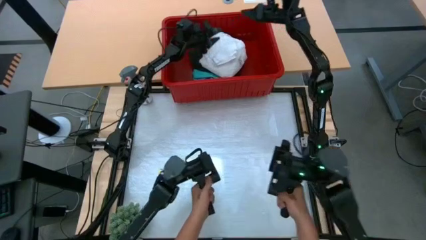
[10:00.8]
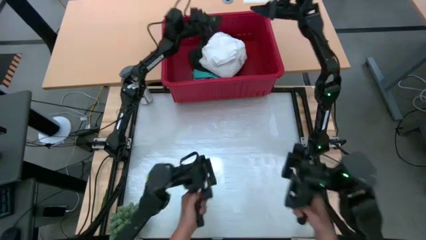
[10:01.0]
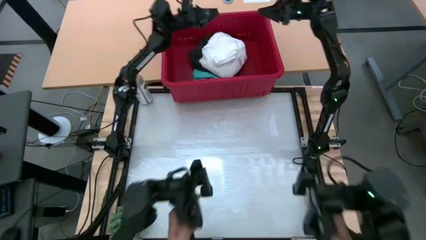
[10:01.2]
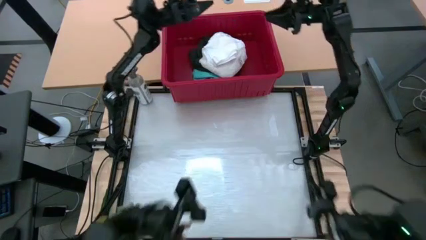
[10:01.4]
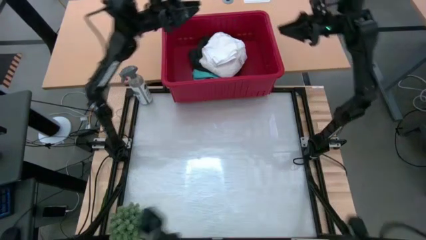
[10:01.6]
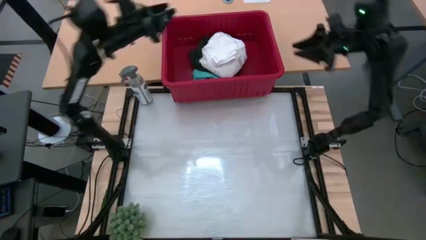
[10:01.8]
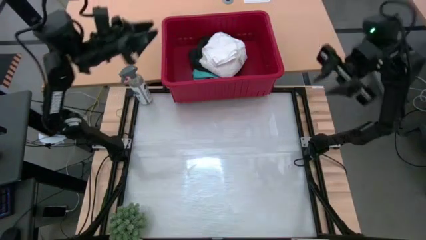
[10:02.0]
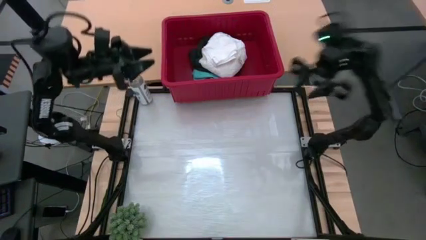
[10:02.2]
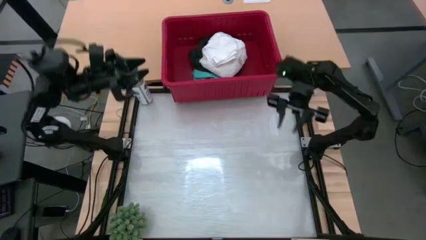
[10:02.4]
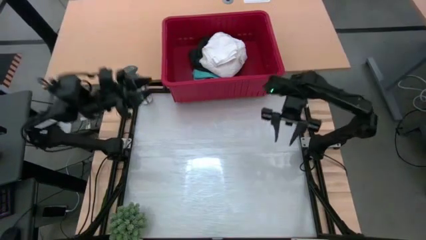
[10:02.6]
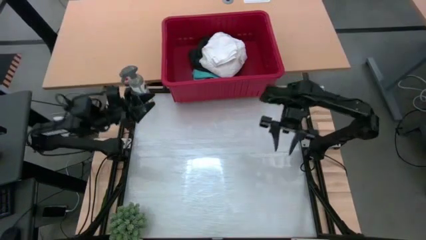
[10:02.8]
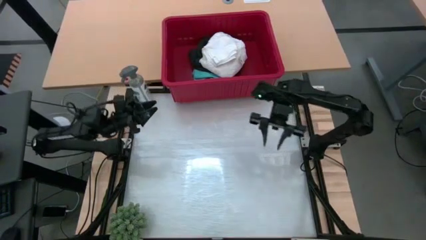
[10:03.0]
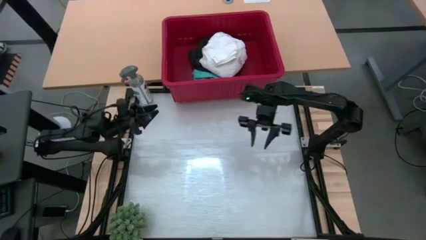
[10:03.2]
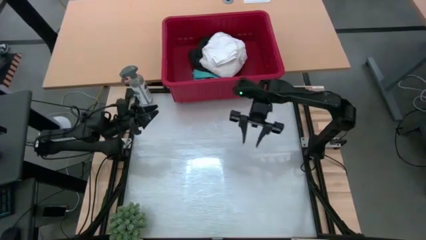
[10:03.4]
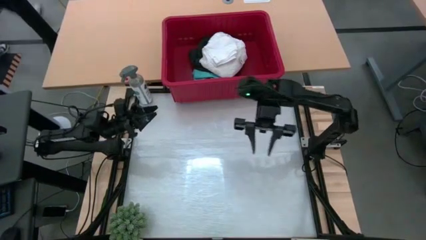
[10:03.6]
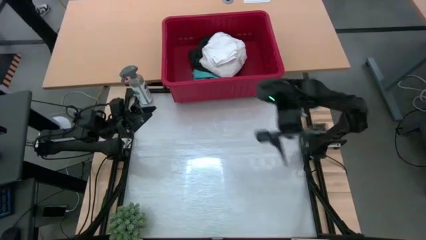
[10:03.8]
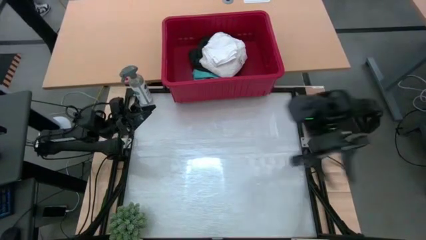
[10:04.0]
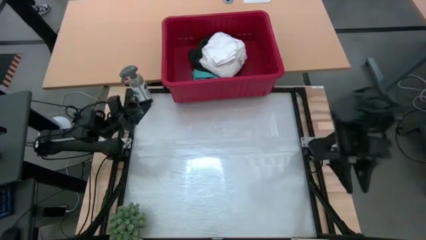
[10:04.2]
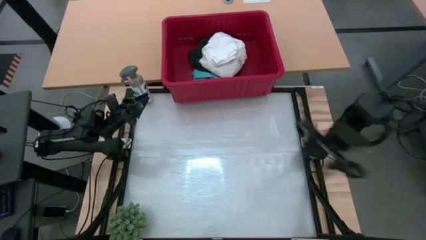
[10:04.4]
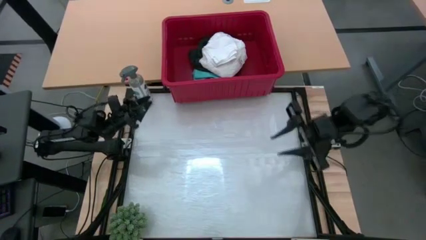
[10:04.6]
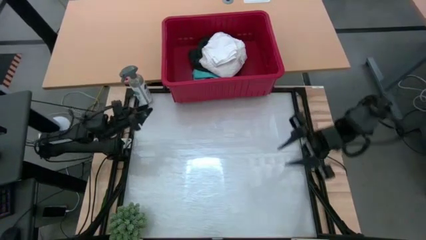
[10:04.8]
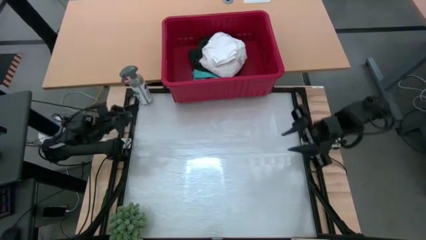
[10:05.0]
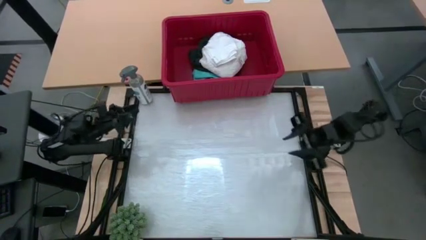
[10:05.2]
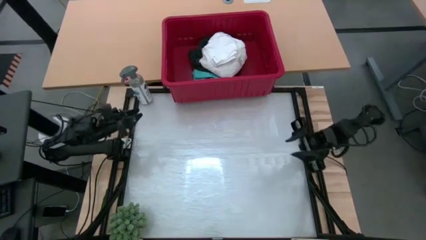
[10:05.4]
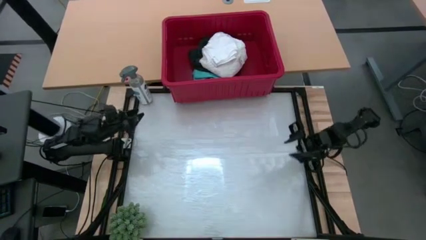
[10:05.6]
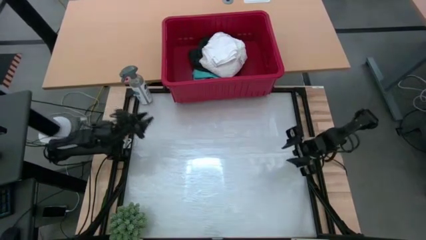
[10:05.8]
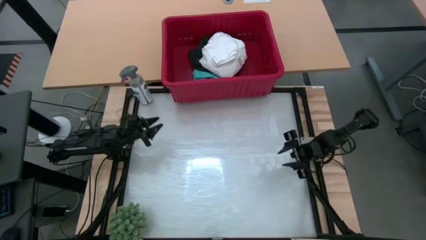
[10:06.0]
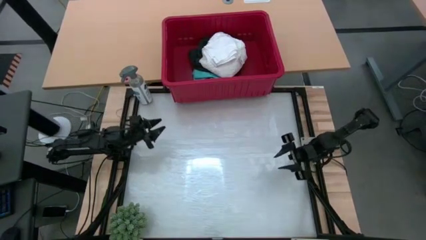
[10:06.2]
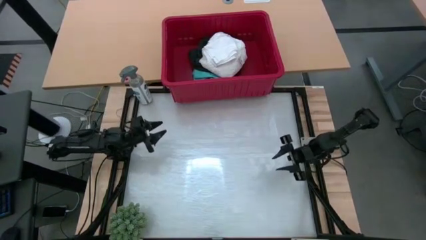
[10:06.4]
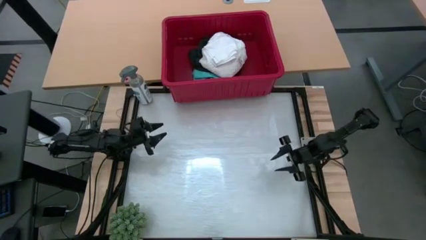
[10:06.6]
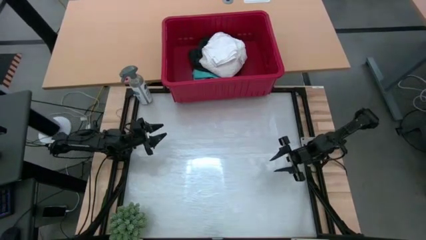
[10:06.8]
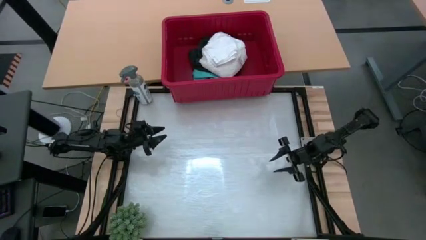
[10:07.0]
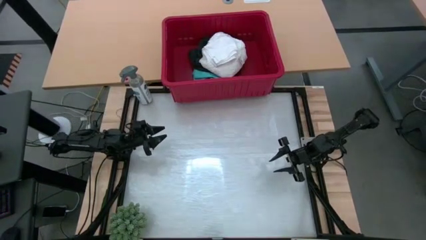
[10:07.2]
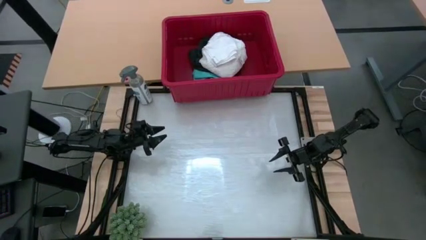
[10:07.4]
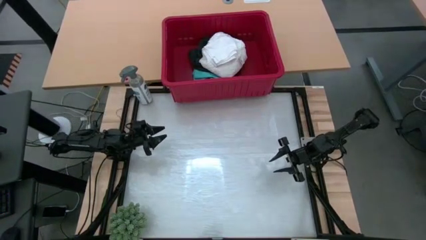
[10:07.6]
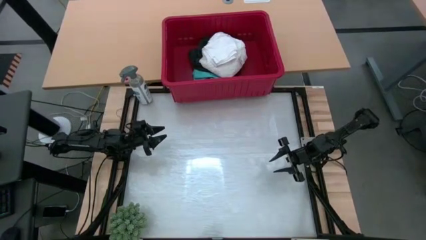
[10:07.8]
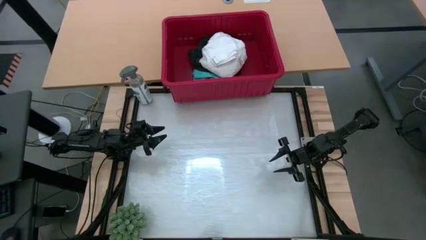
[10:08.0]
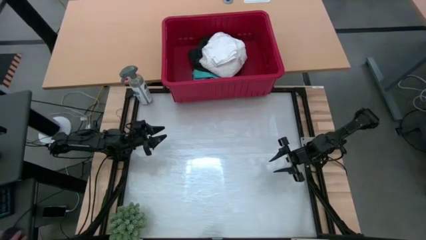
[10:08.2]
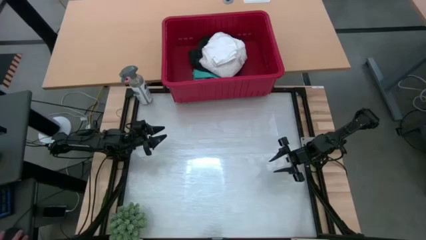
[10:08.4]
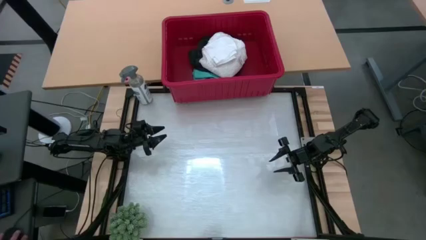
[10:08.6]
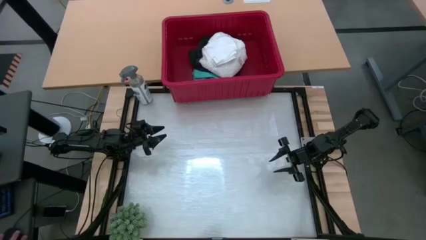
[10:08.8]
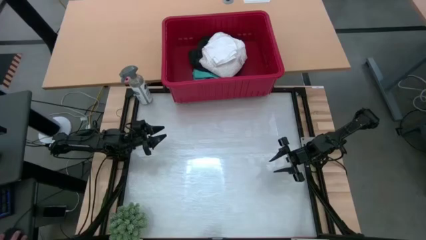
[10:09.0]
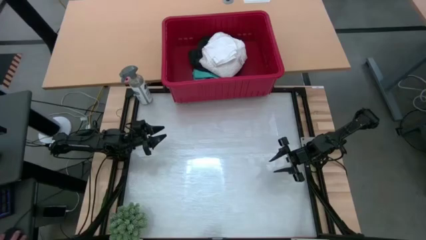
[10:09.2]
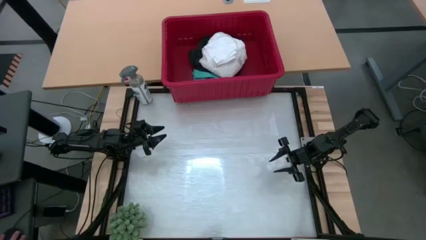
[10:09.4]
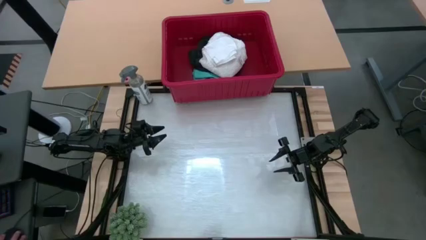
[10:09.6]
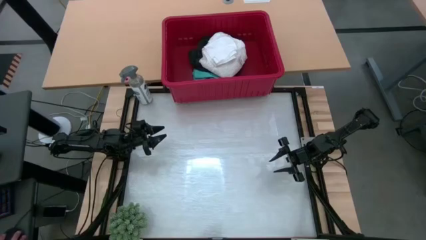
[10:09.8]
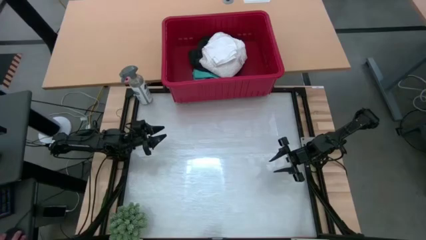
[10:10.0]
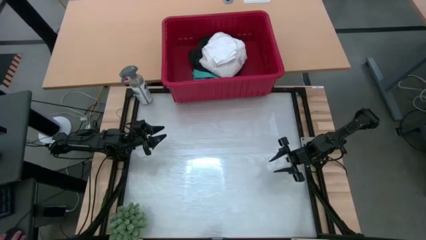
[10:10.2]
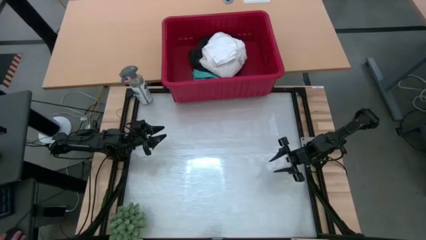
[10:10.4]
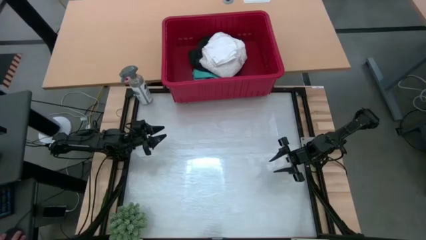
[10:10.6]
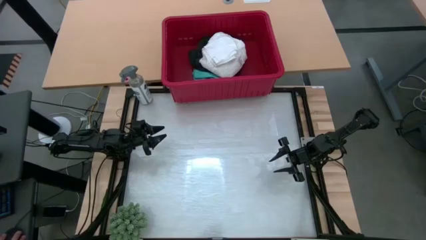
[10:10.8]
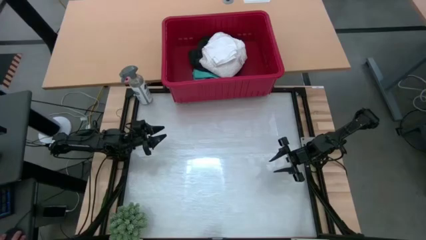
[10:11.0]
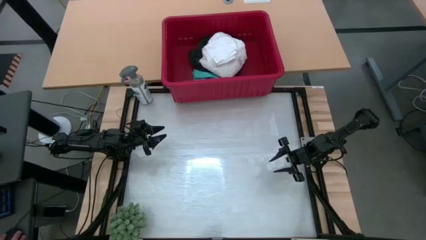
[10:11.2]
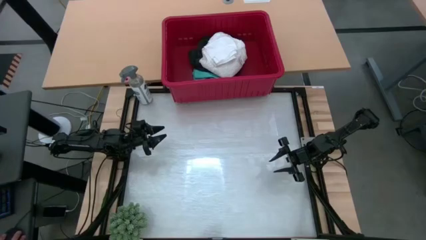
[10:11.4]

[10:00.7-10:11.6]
Task: Fold laundry
Return to Home Position

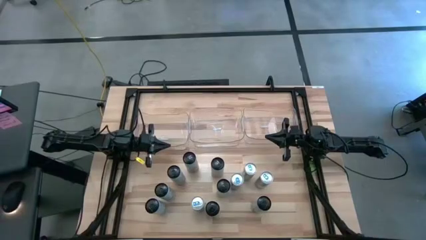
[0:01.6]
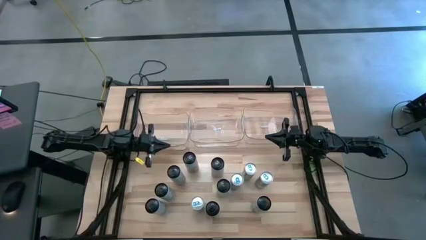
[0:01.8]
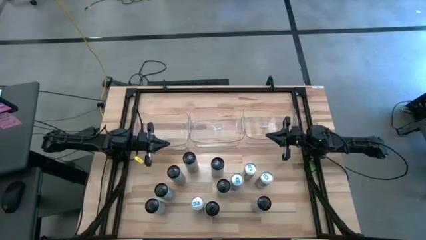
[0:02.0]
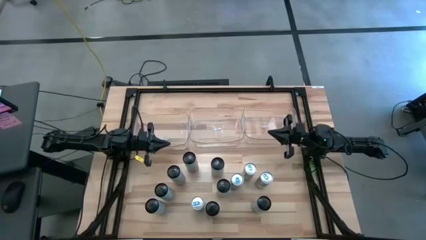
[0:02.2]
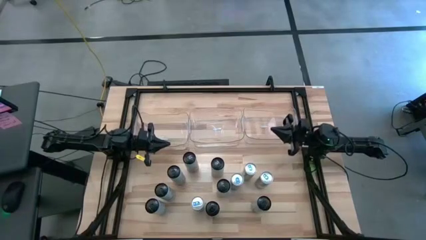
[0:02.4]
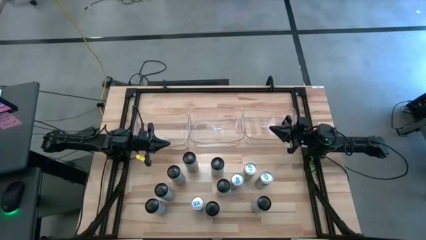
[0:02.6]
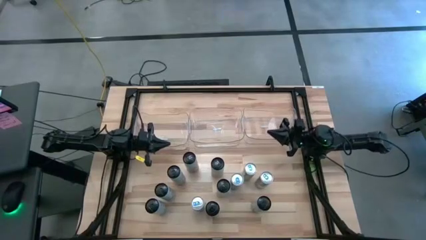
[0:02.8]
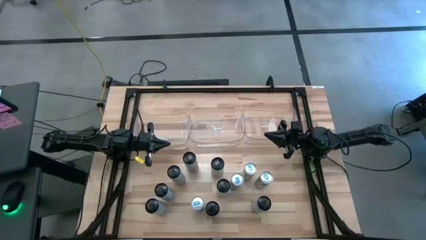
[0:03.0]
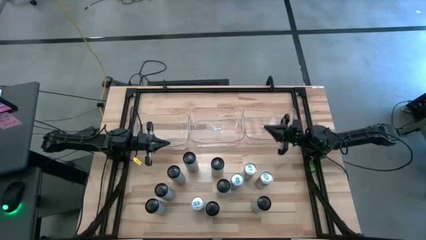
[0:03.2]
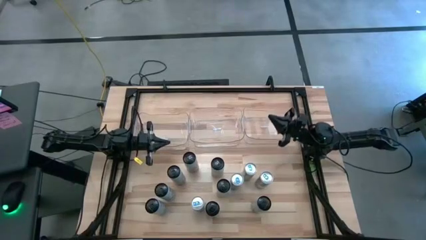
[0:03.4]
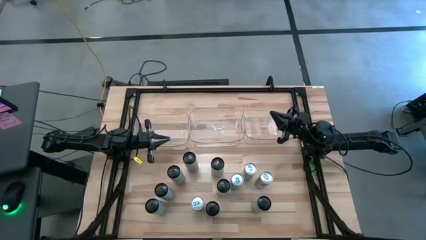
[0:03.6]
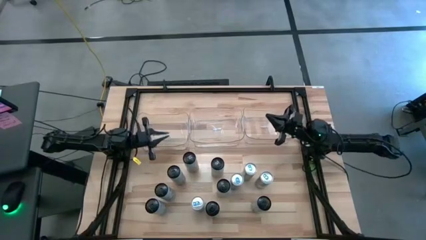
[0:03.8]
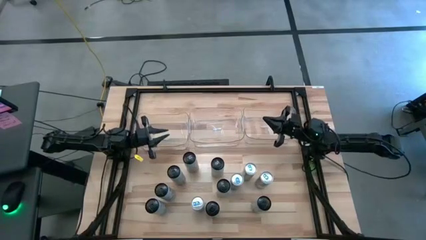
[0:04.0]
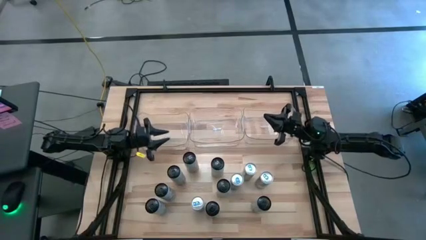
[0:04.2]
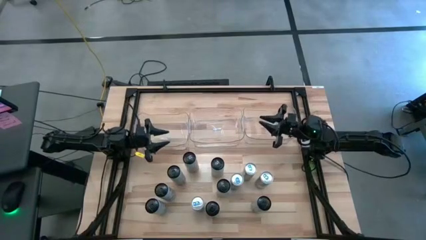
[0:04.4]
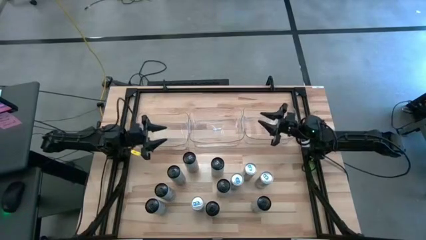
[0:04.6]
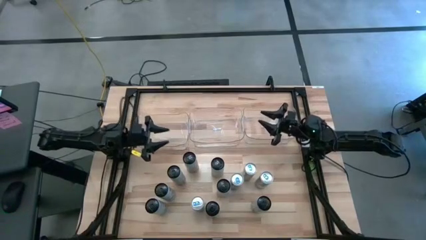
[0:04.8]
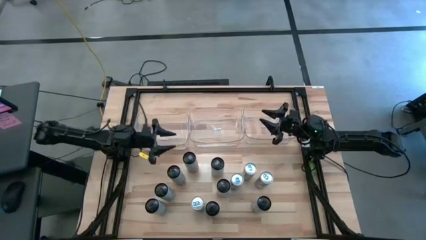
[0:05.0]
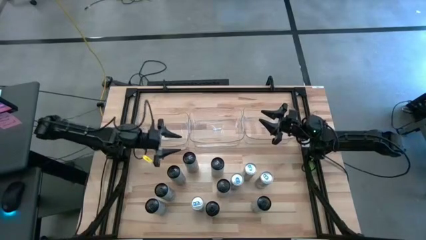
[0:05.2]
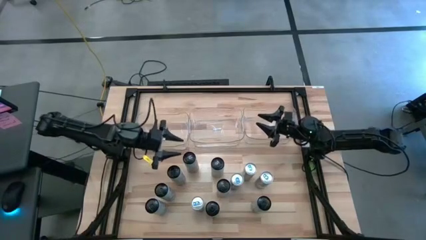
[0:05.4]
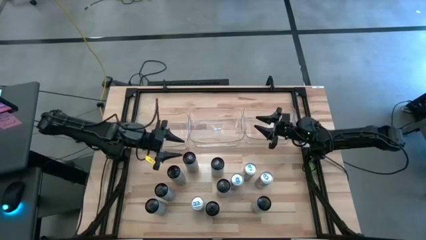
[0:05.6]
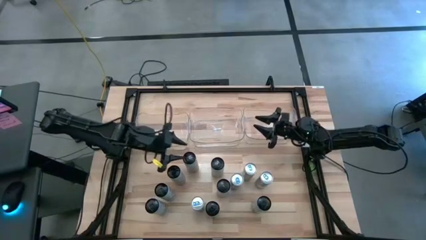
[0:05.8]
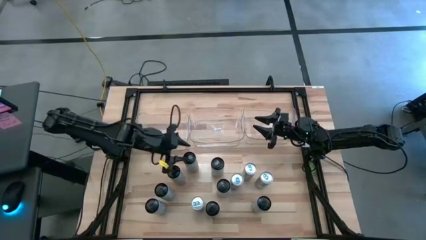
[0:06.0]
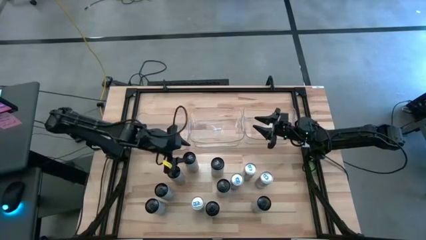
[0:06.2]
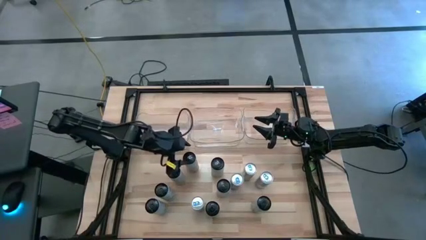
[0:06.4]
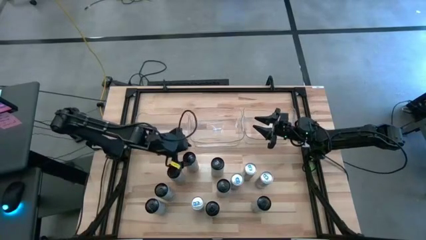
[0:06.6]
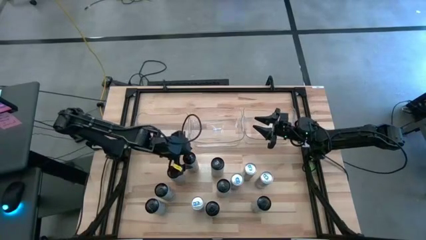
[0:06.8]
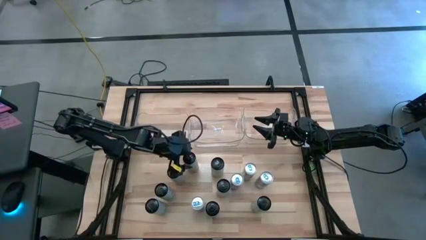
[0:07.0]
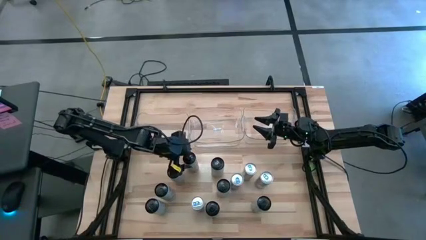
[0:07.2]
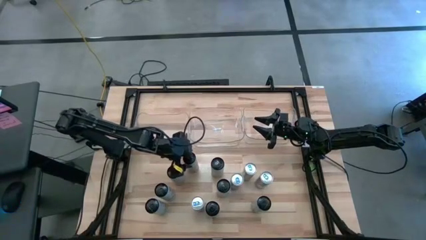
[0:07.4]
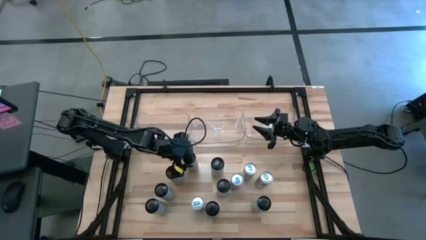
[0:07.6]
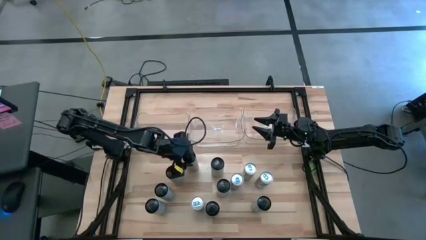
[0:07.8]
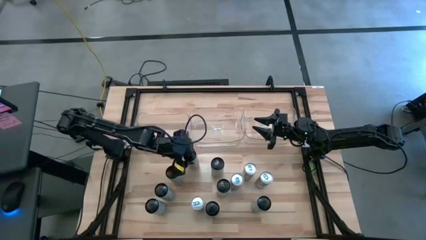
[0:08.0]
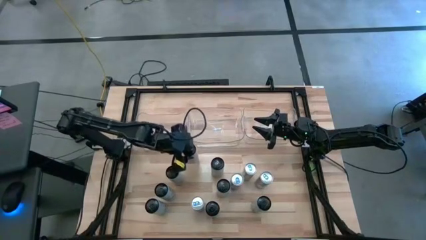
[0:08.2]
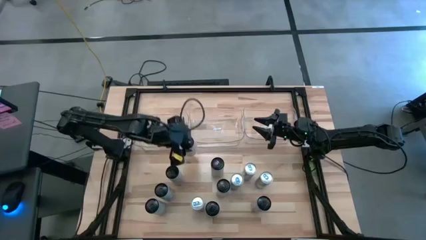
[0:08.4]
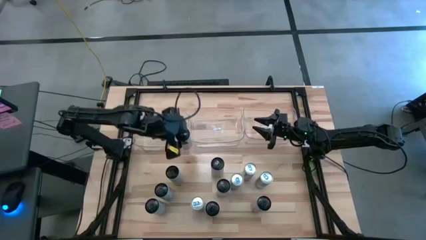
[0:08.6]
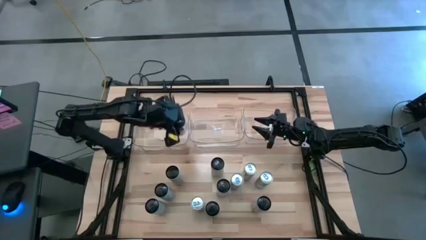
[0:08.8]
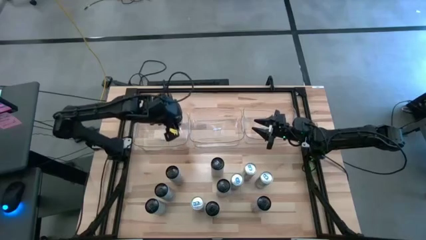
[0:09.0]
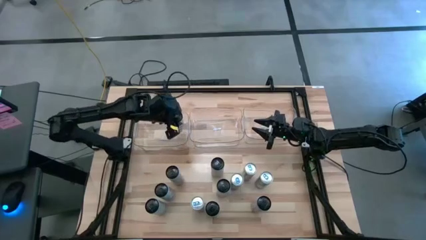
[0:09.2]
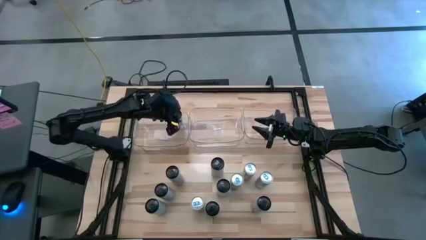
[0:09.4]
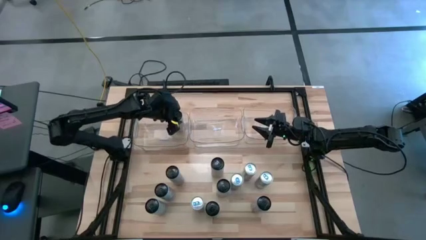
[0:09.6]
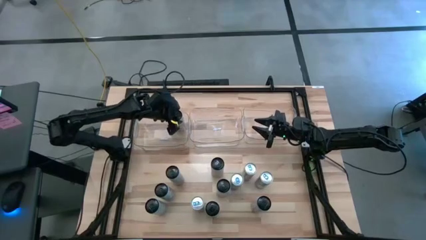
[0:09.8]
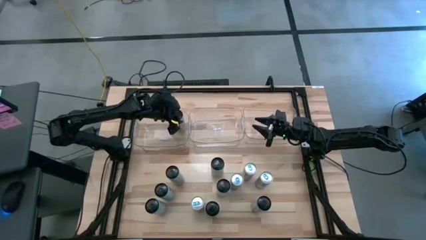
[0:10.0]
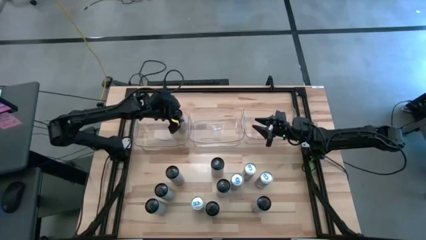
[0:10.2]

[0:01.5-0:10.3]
Task: Sort soda cans
Put the green soda can into the left transparent bin
